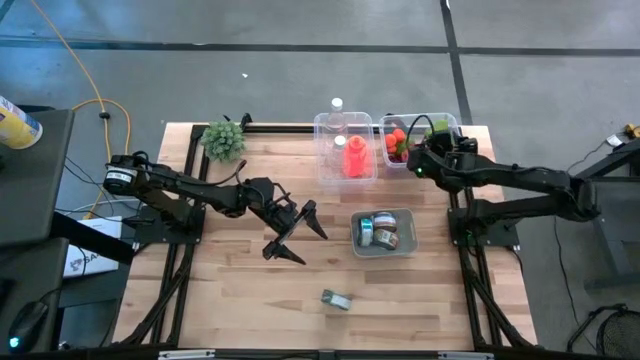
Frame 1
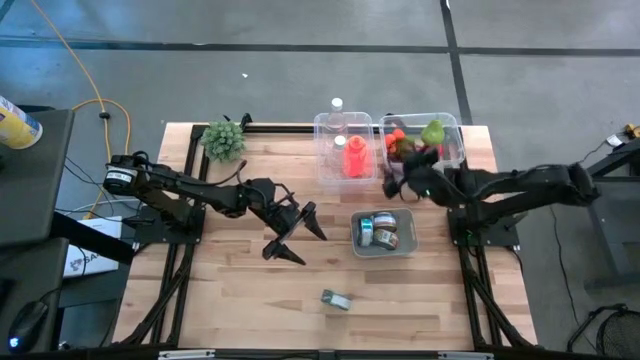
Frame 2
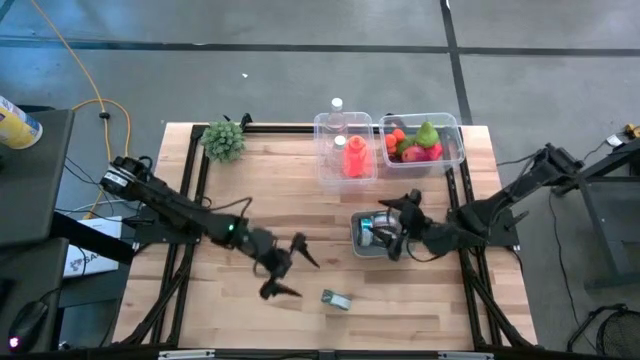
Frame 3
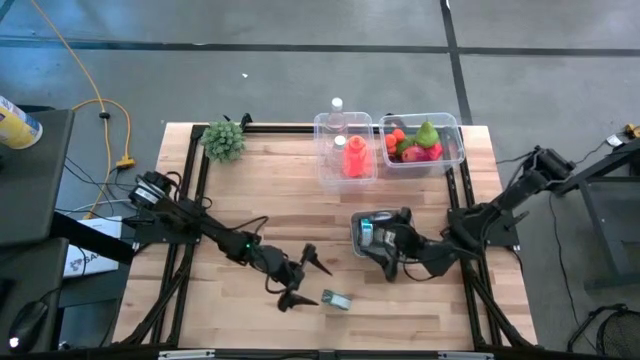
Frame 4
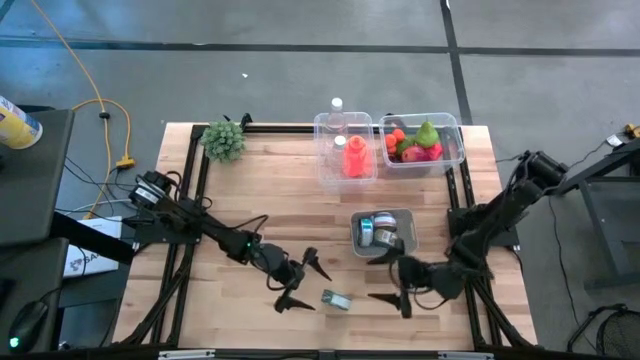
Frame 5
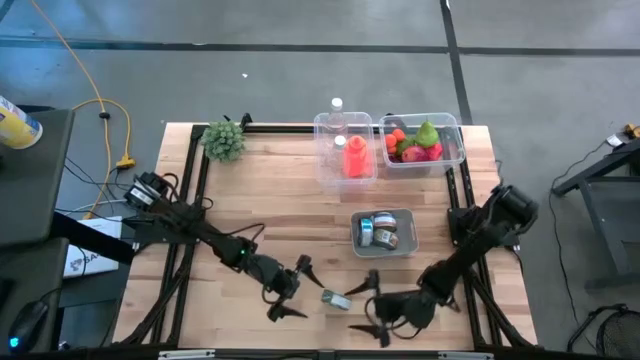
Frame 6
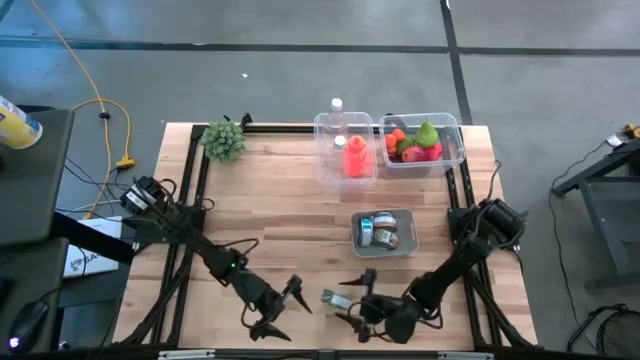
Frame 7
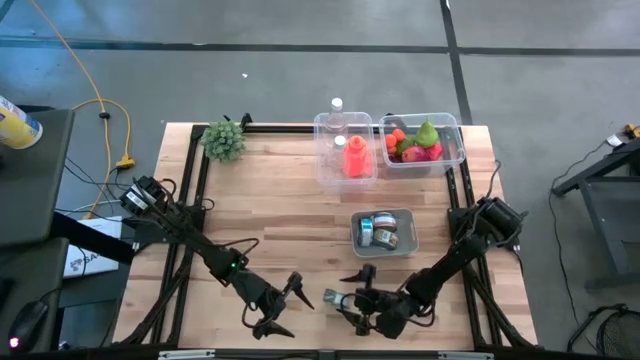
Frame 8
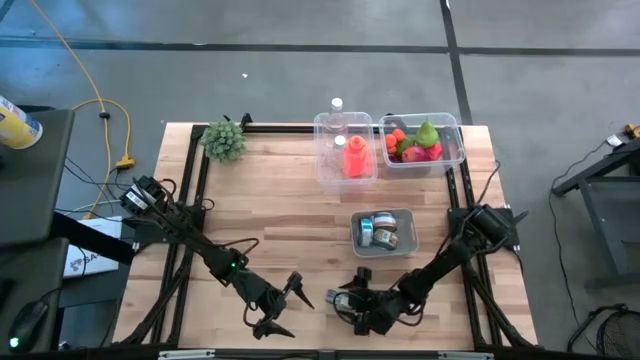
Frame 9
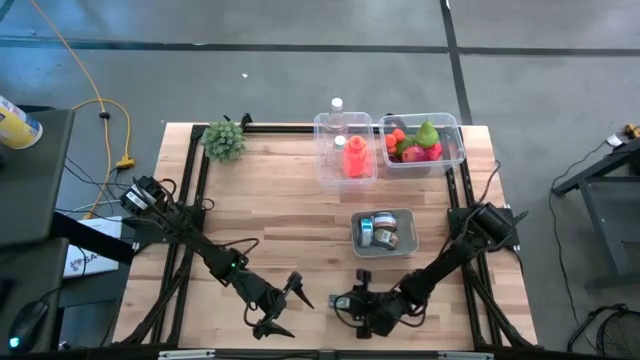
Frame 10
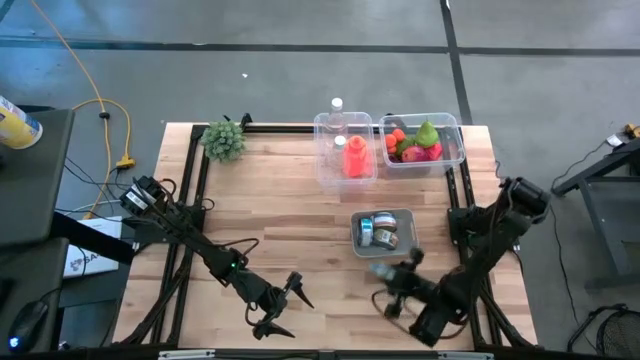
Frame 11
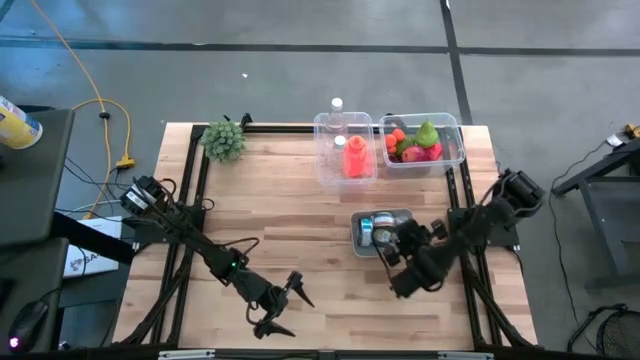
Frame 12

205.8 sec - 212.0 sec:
Task: Pick & Place Food Item
Put the green tuna can into the gray bin

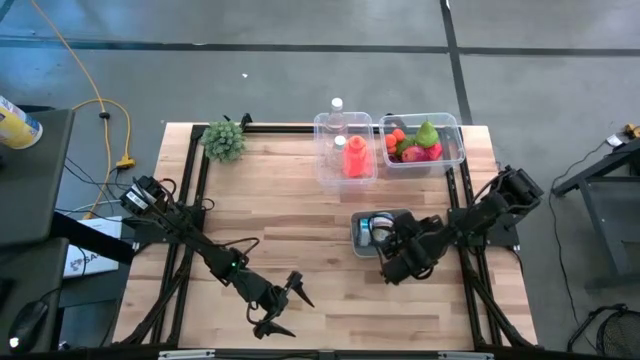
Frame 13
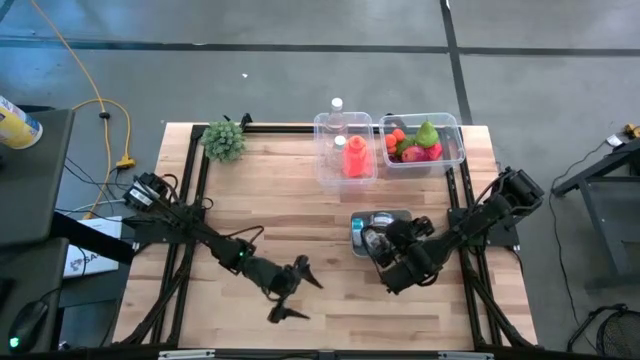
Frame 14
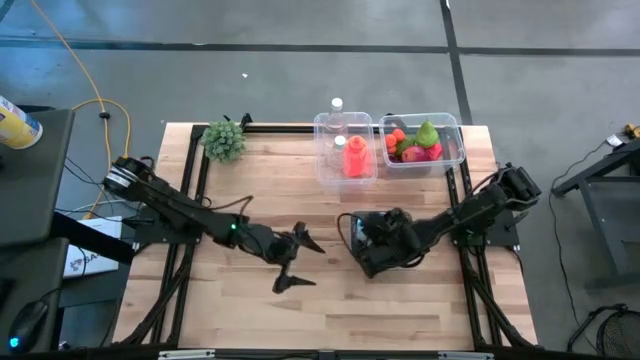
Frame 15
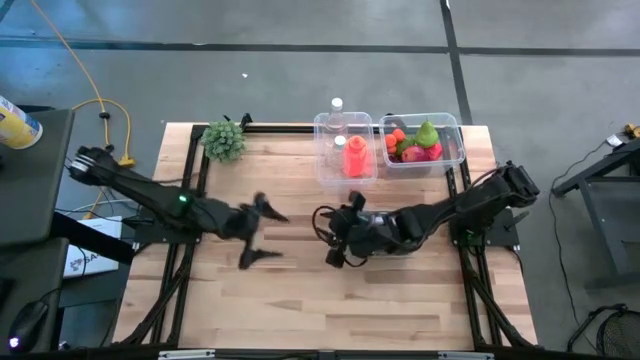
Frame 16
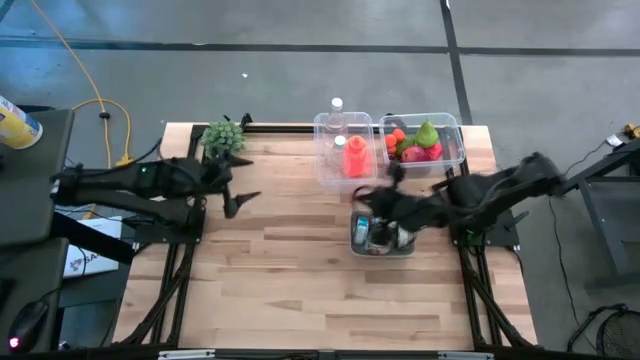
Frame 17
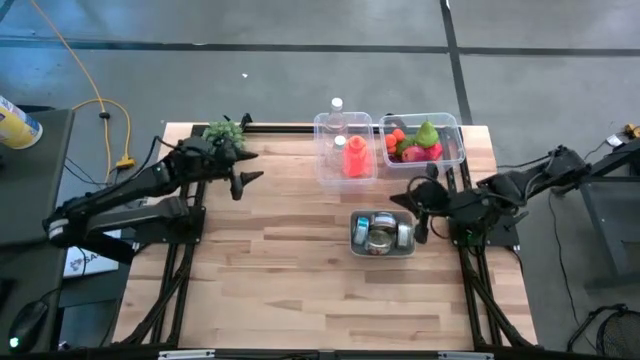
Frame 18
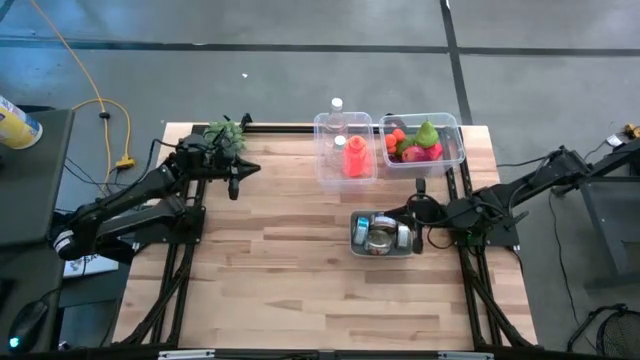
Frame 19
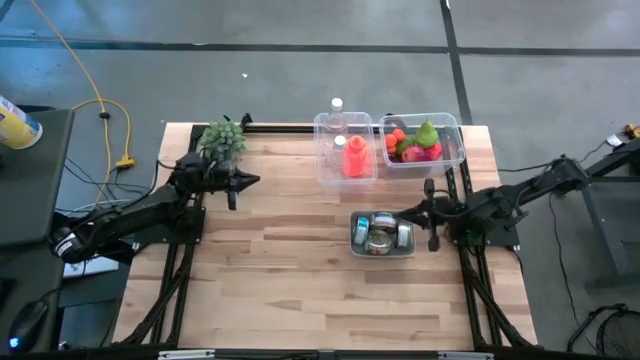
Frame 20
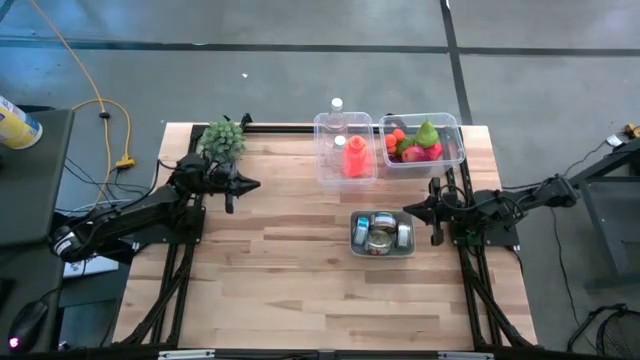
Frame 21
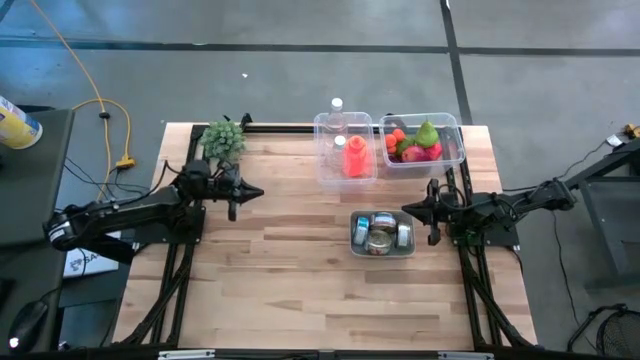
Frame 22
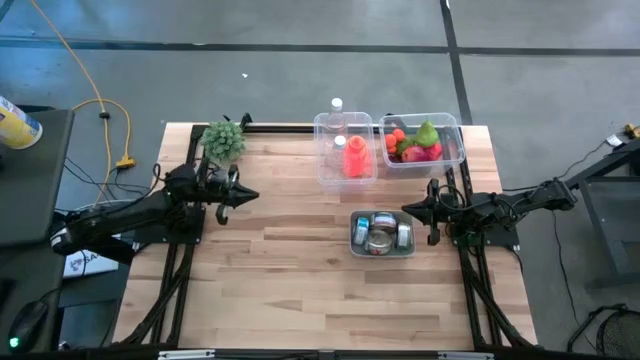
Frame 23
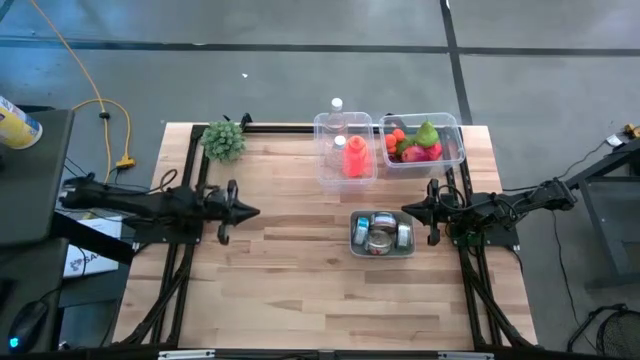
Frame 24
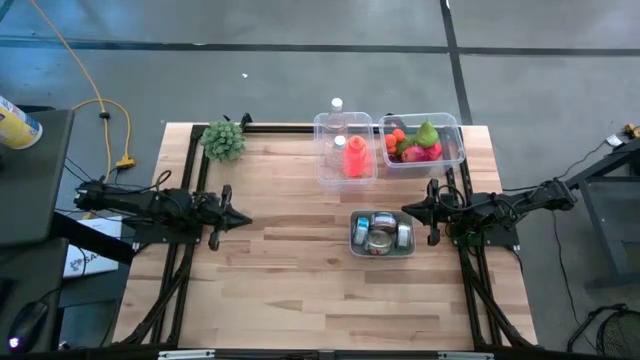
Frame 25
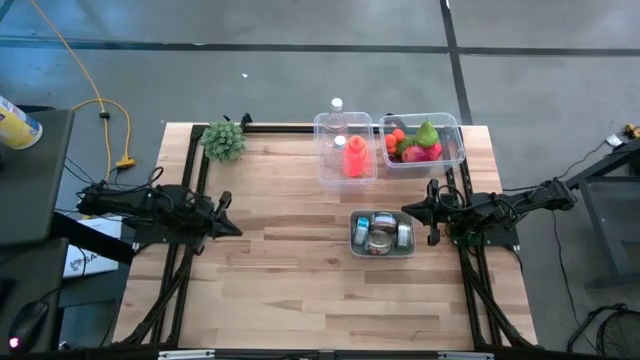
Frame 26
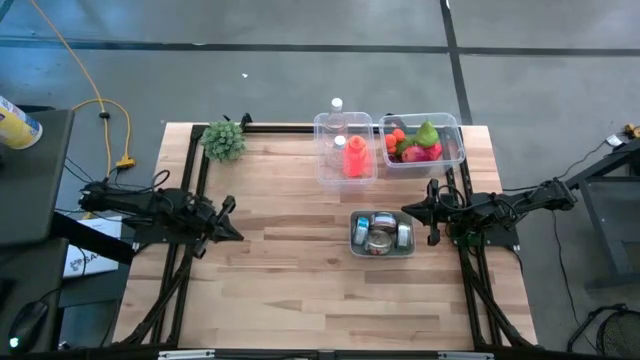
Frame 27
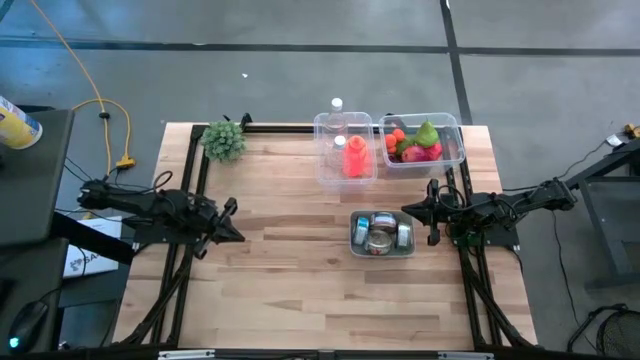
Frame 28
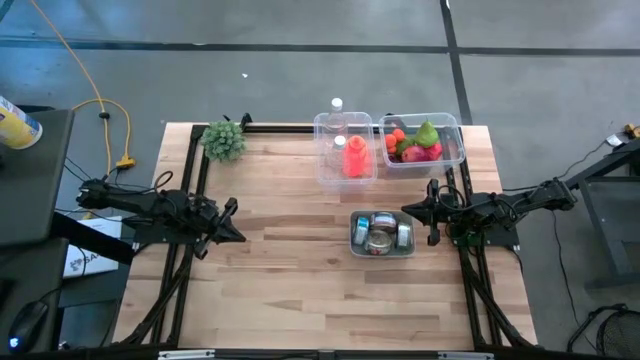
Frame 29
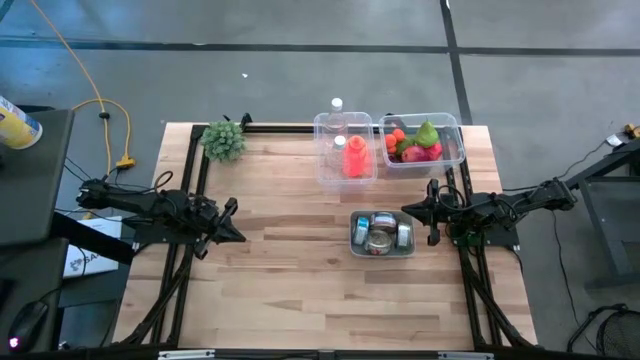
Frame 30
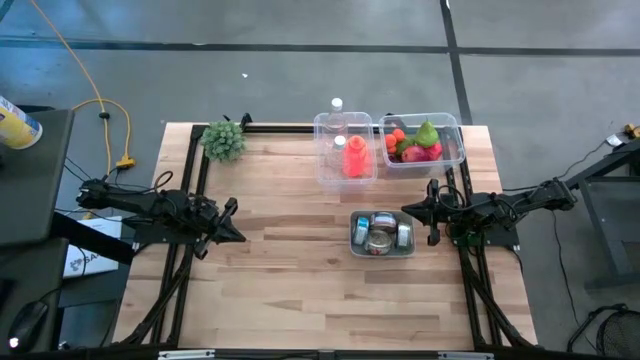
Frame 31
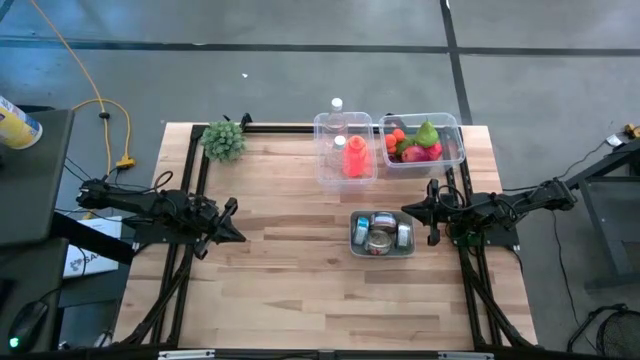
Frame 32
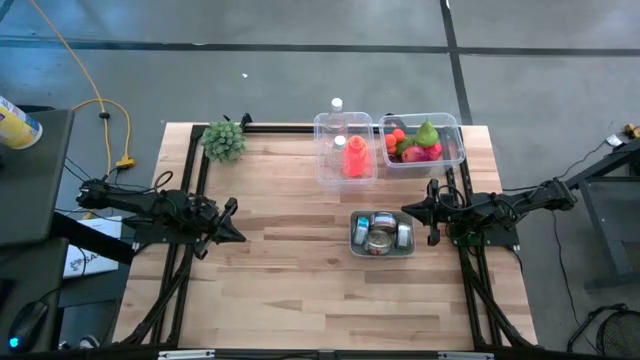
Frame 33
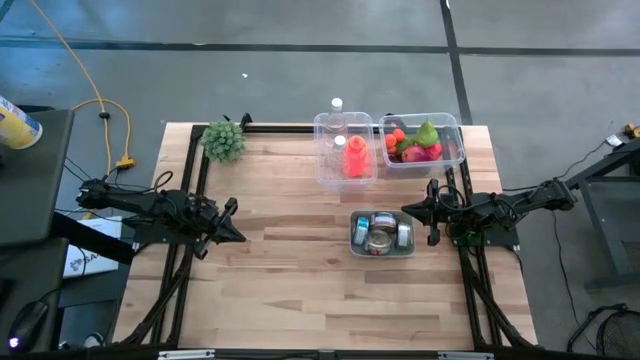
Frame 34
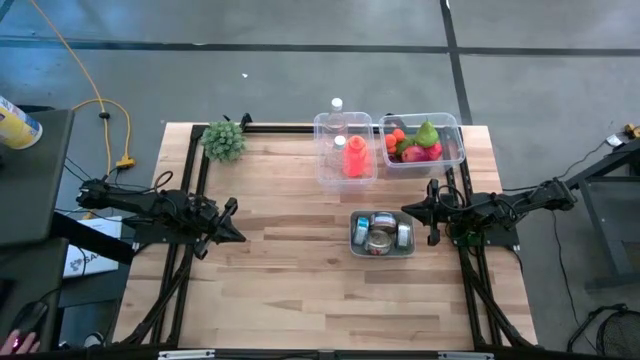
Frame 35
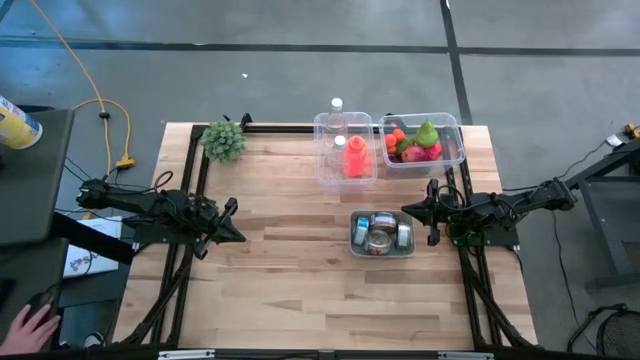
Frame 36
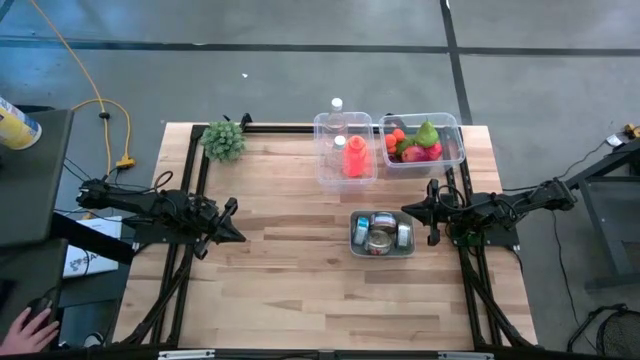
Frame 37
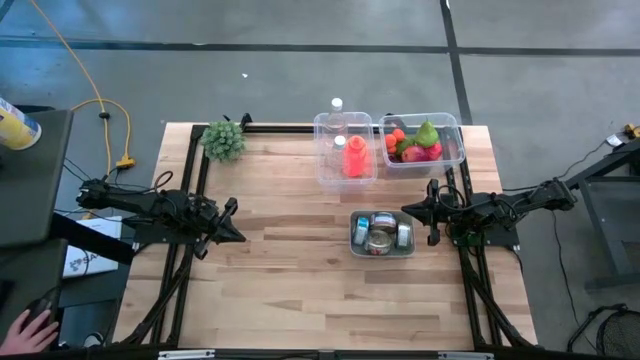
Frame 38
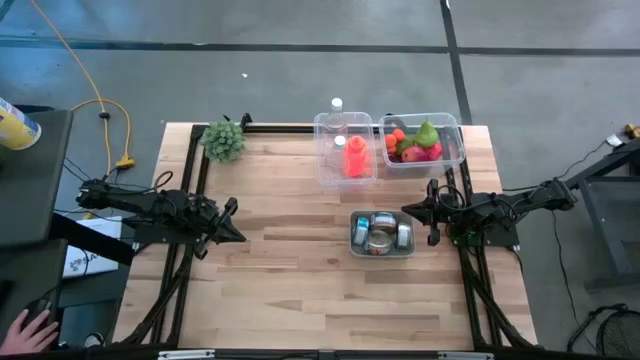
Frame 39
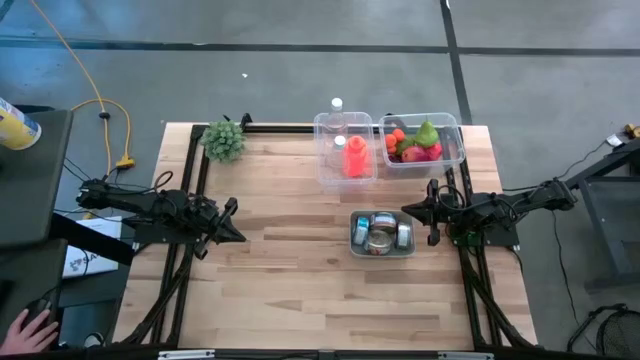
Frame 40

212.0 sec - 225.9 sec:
Return to Home Position

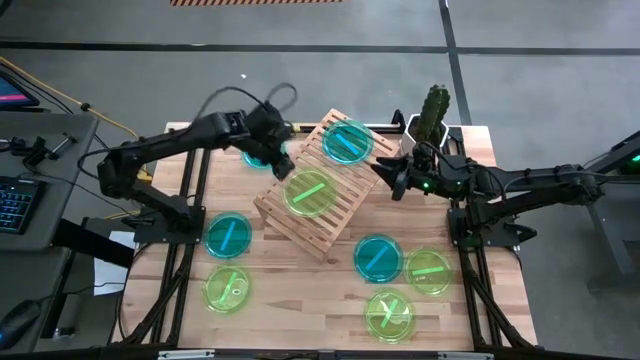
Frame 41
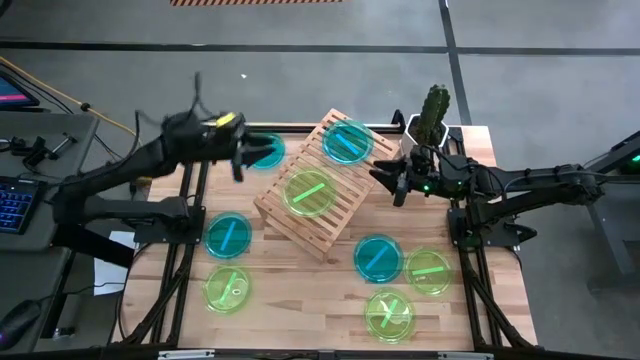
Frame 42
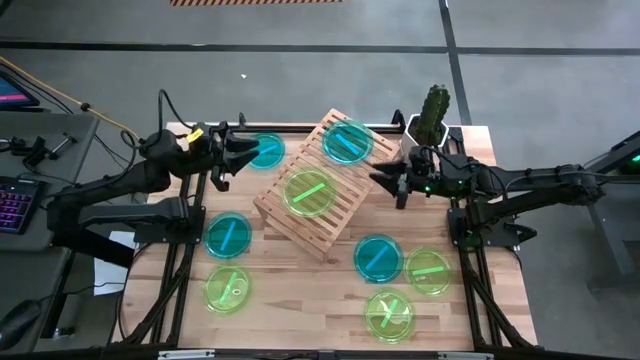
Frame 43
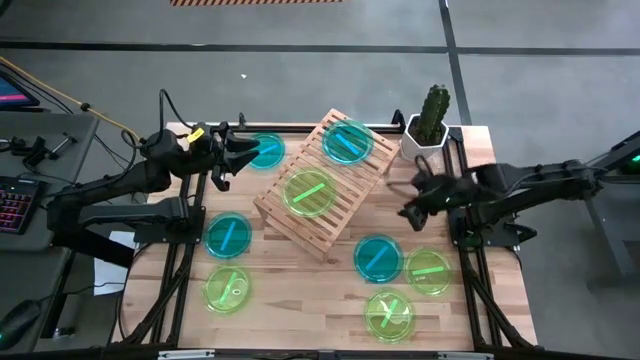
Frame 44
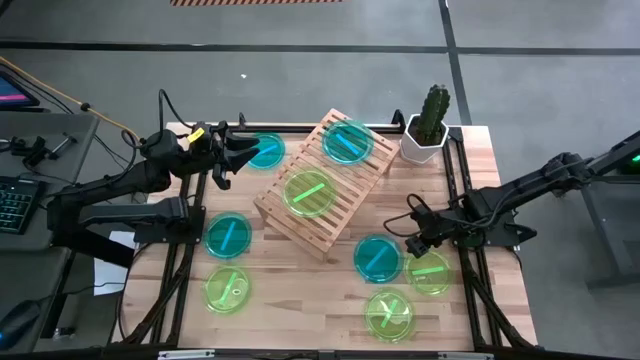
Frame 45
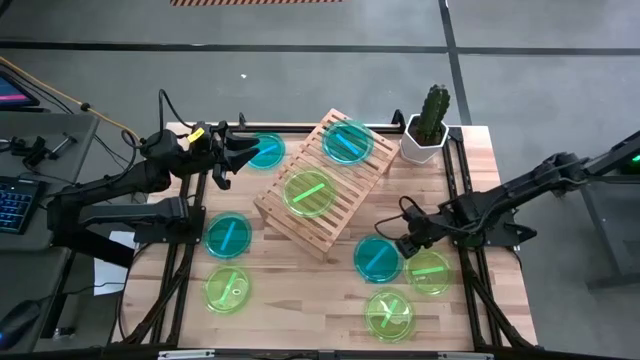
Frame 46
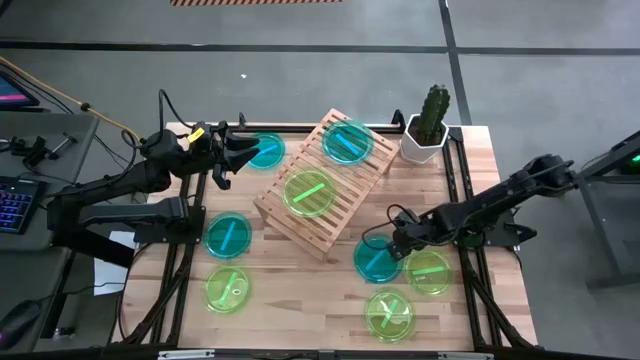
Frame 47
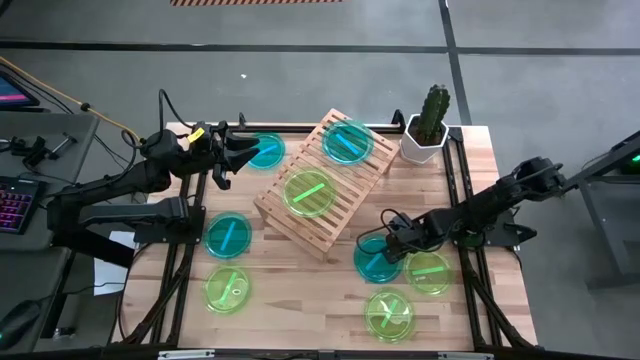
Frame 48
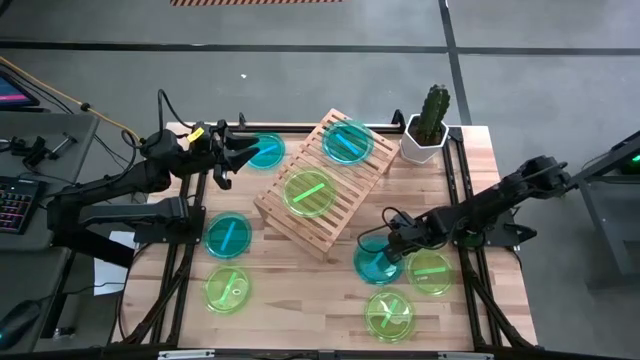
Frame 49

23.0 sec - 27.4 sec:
Task: Place and stack plates onto a shelf
Stack the blue plate on top of the blue plate on the shelf
